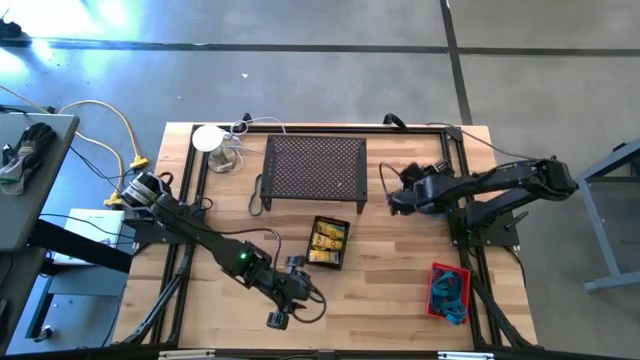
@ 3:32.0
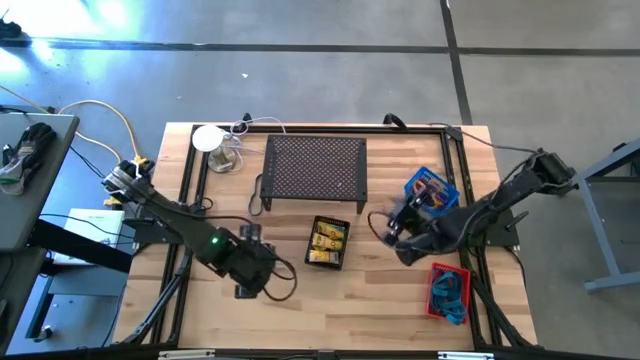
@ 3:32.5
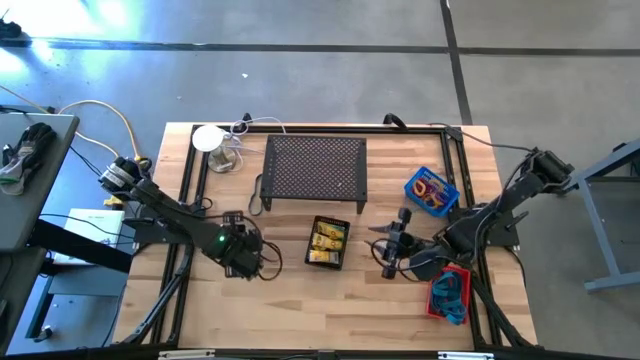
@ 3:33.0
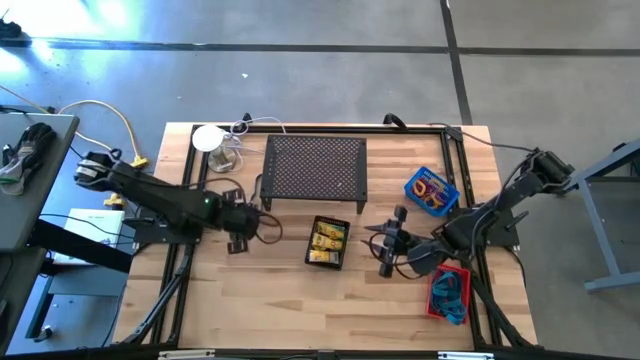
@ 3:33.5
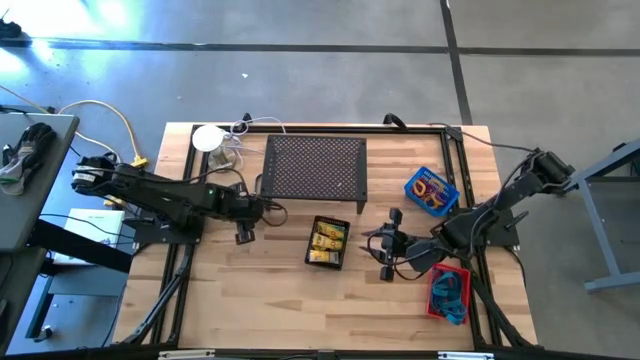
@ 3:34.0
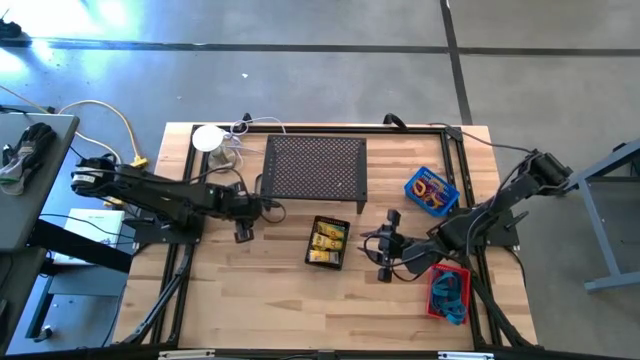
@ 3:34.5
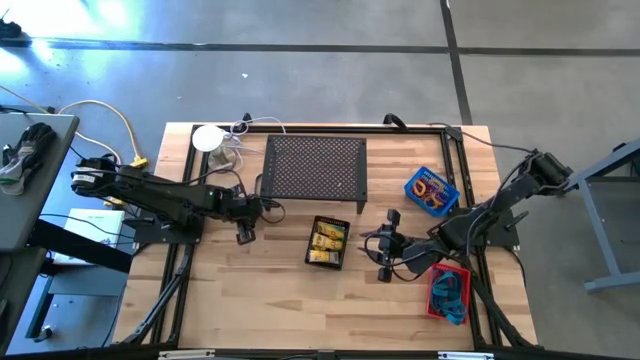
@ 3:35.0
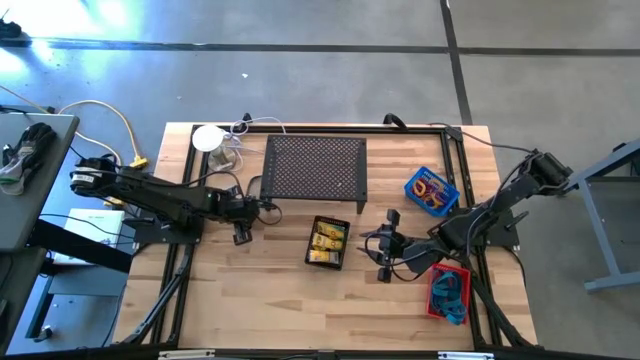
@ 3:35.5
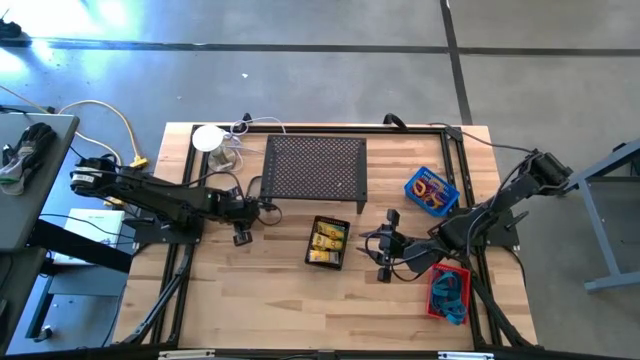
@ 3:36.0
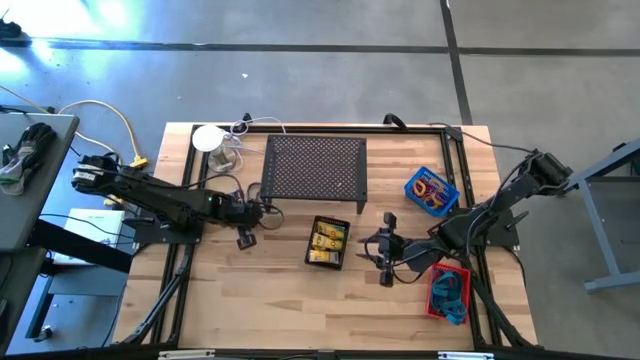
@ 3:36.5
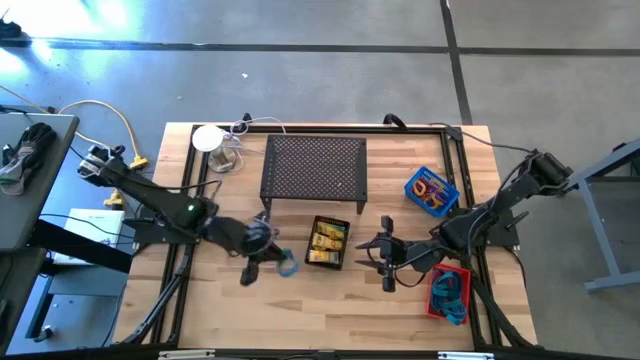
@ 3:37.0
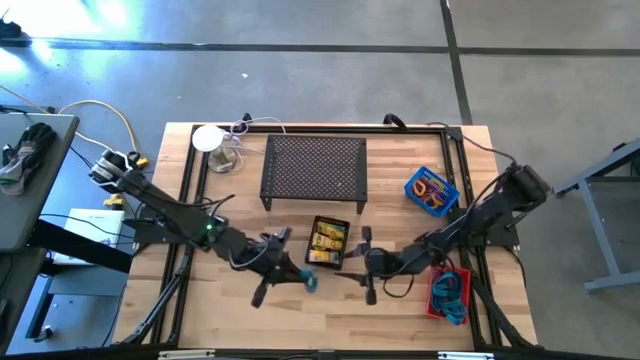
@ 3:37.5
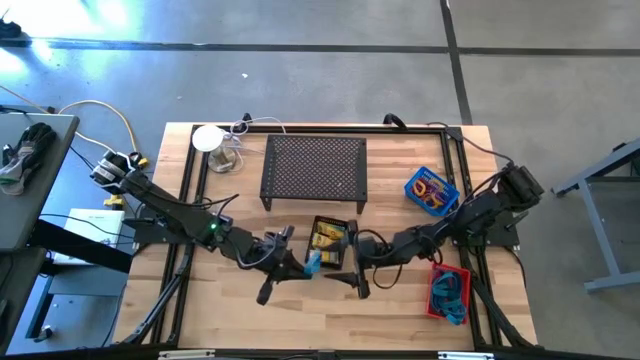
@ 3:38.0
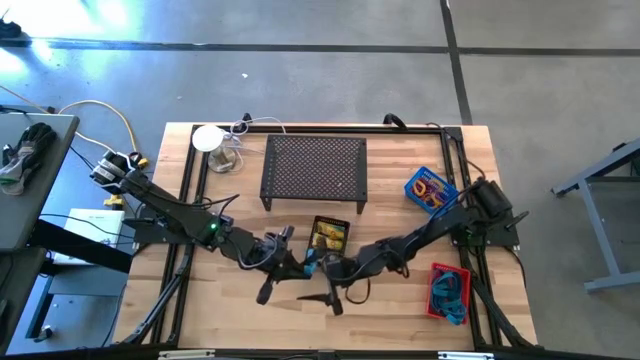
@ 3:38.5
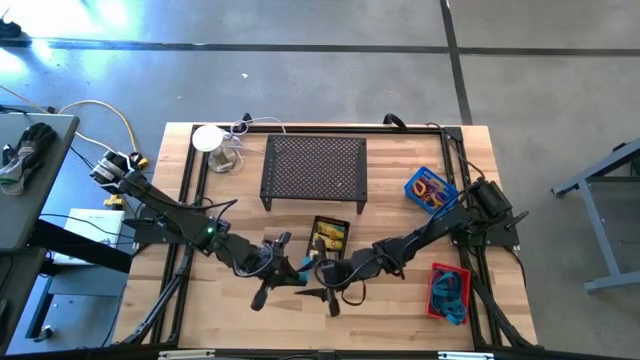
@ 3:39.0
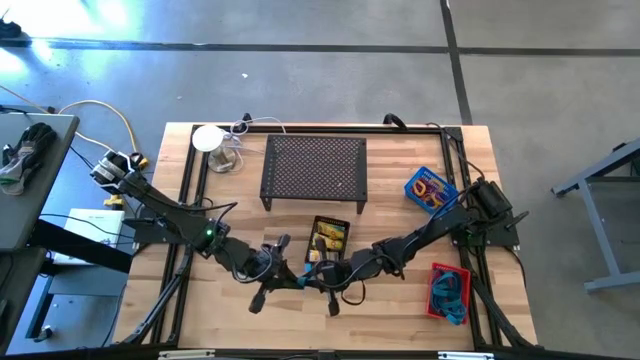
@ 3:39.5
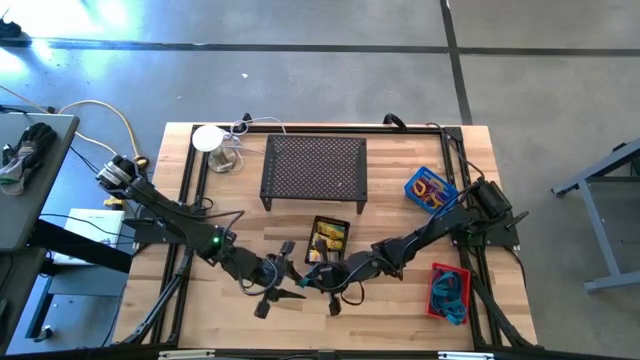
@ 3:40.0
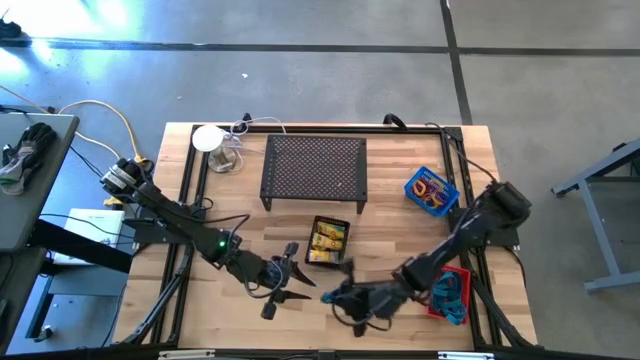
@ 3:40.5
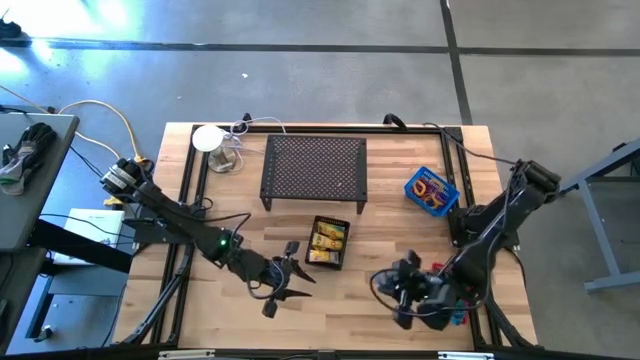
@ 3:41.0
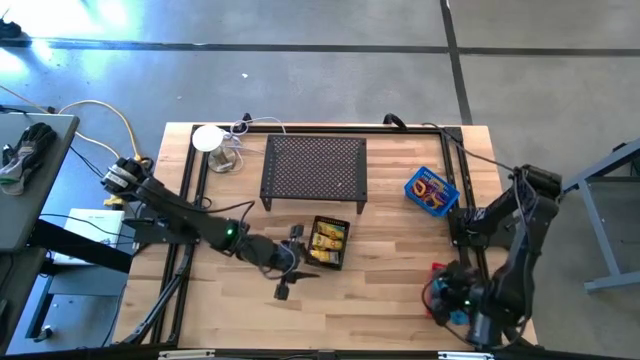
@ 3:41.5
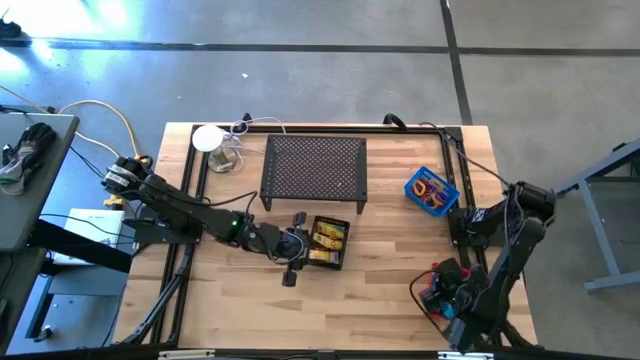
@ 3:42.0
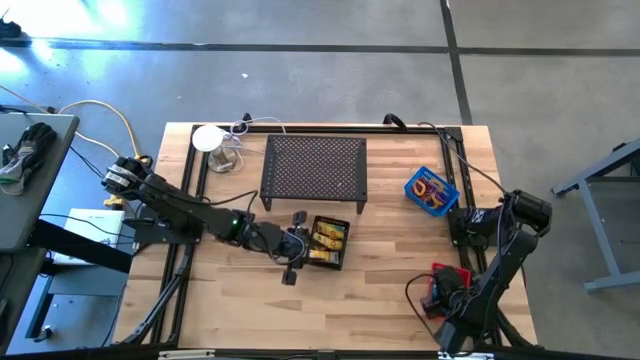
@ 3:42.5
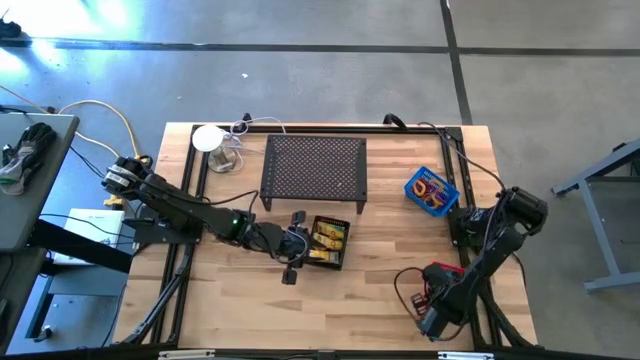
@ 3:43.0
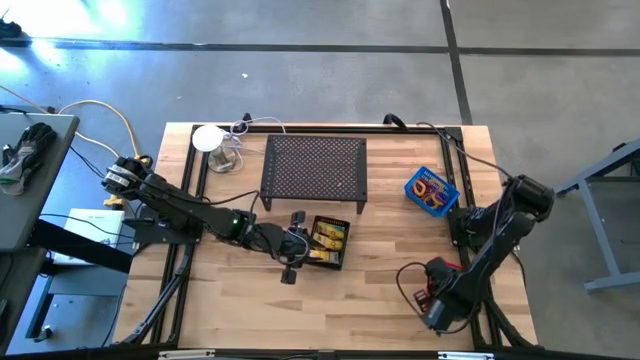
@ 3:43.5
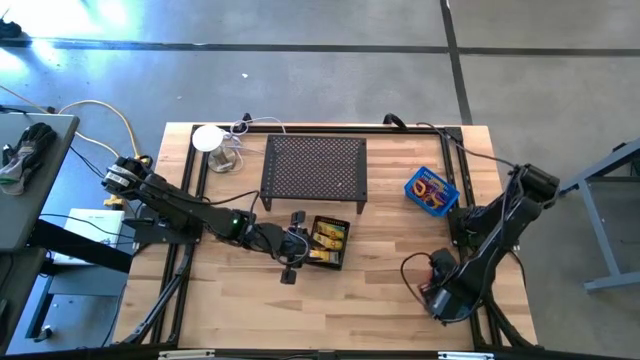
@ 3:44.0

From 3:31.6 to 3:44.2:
Task: Pick & Place Office Desk Supplies
Put the blue rubber band into the orange bin

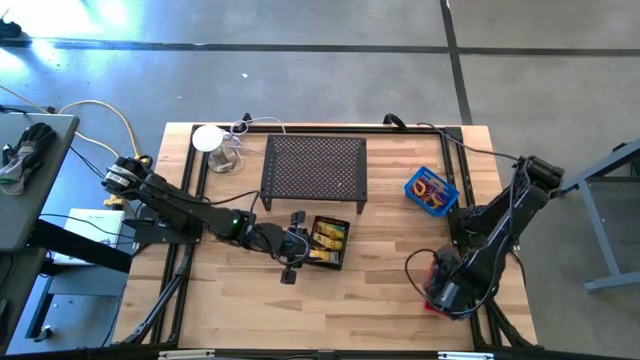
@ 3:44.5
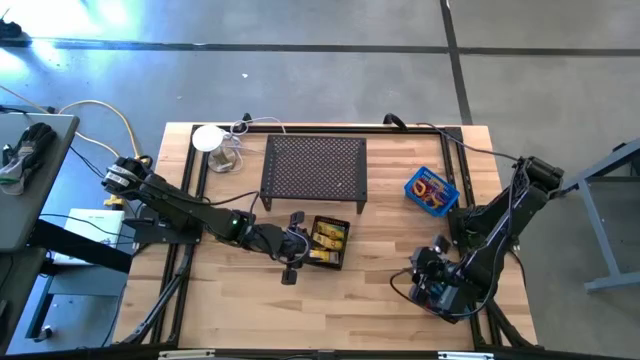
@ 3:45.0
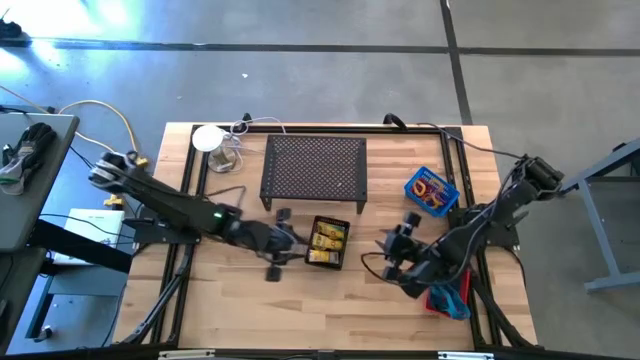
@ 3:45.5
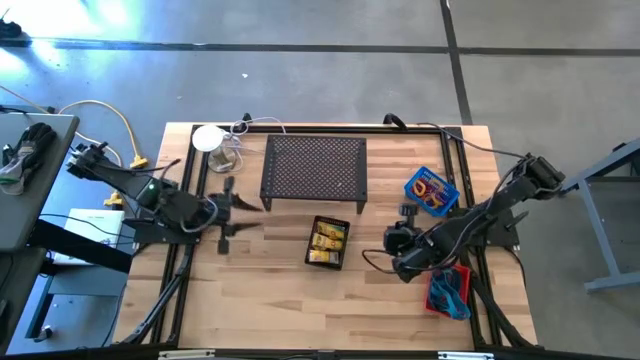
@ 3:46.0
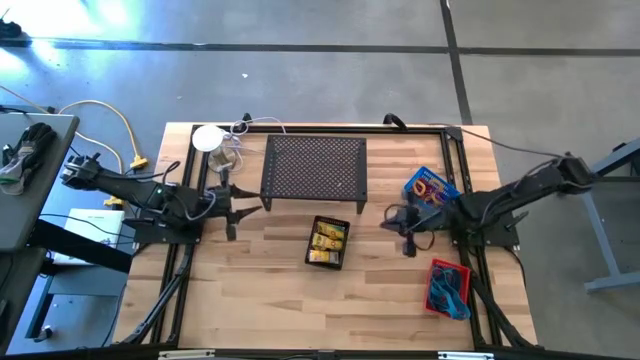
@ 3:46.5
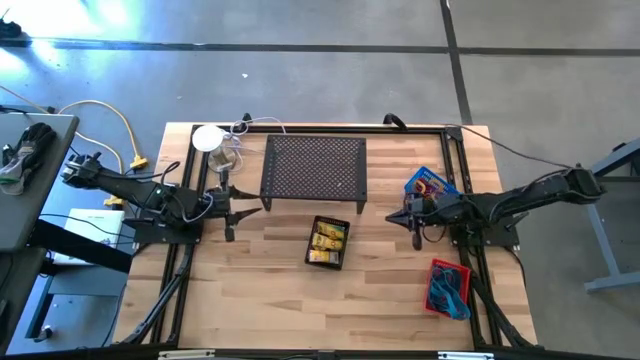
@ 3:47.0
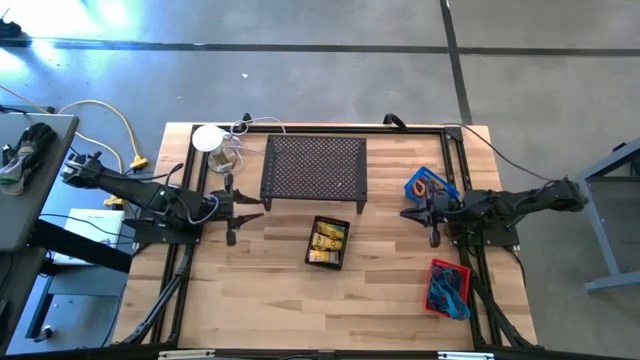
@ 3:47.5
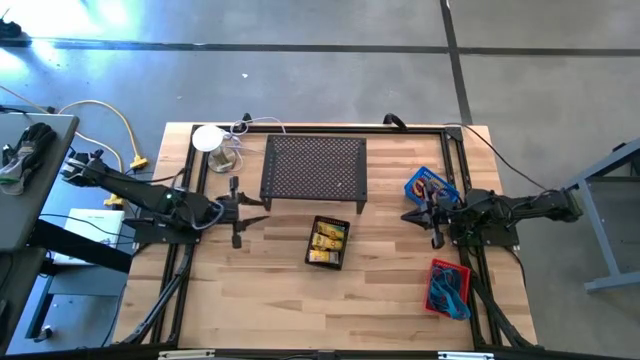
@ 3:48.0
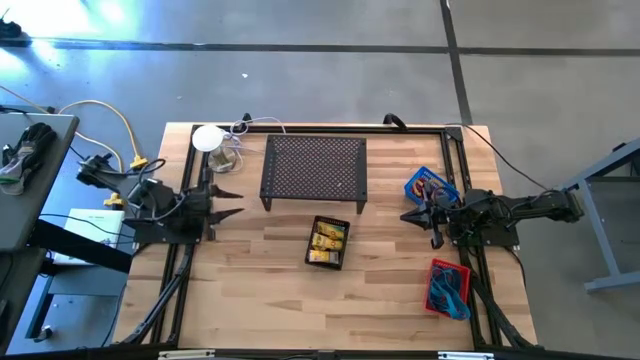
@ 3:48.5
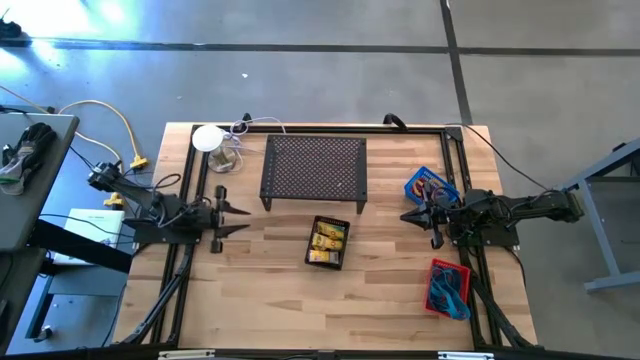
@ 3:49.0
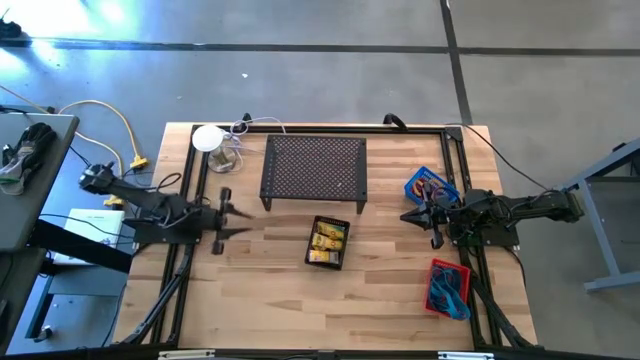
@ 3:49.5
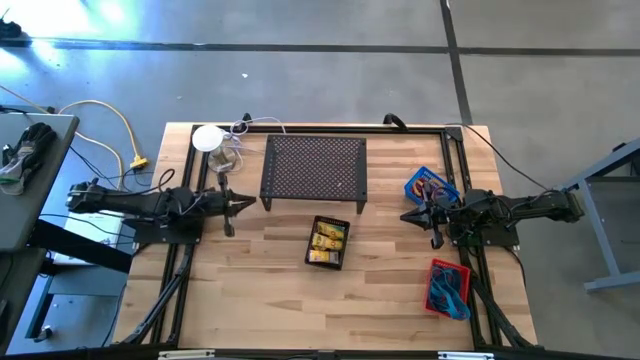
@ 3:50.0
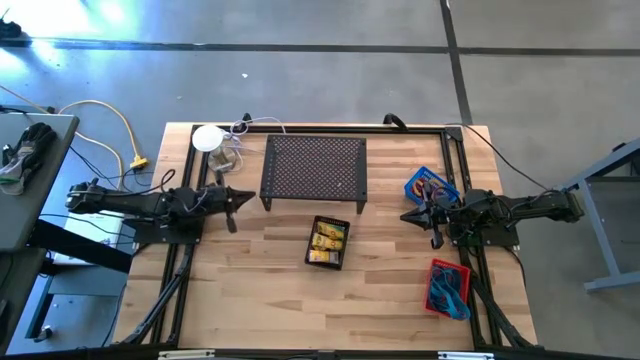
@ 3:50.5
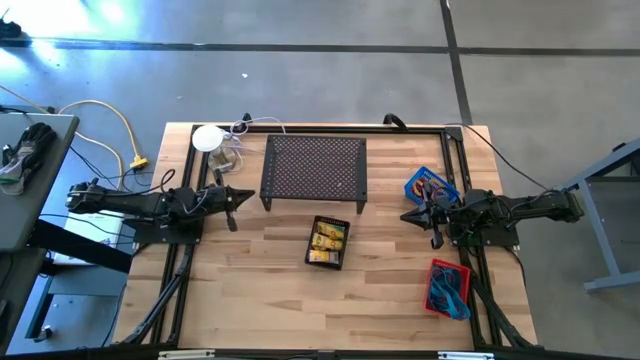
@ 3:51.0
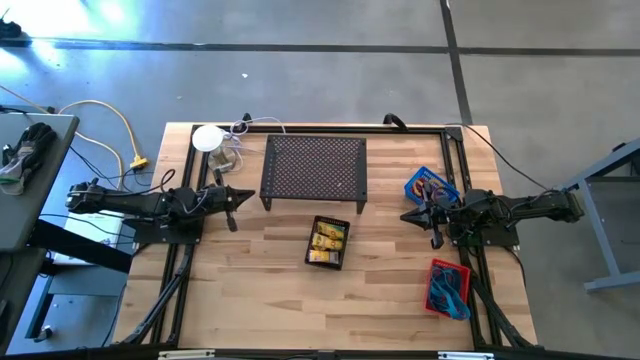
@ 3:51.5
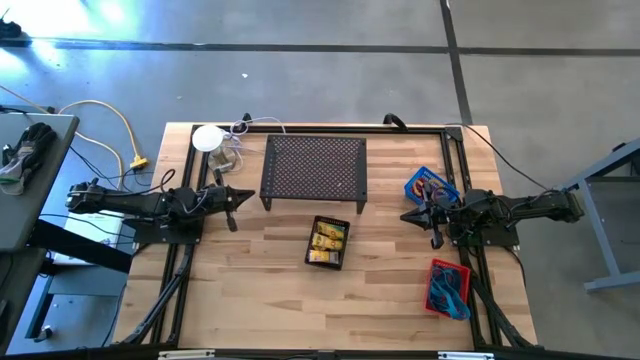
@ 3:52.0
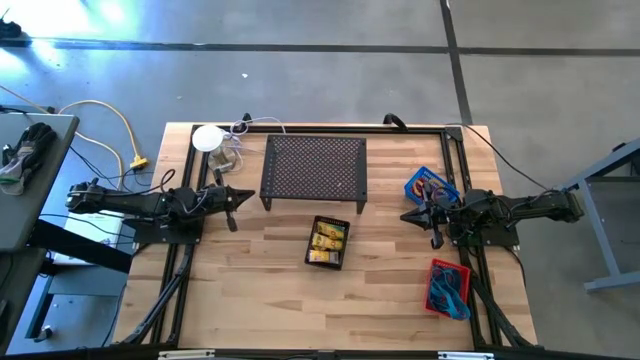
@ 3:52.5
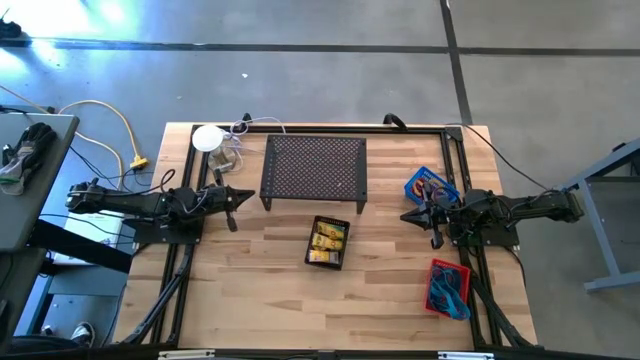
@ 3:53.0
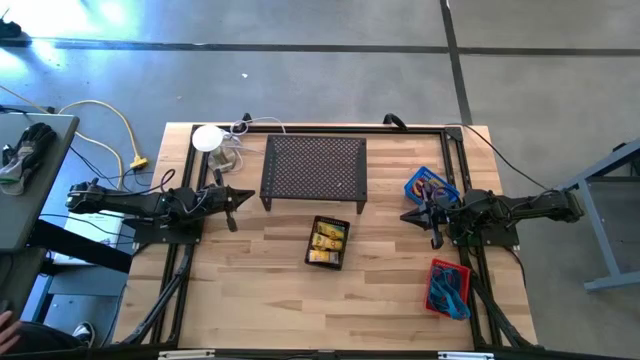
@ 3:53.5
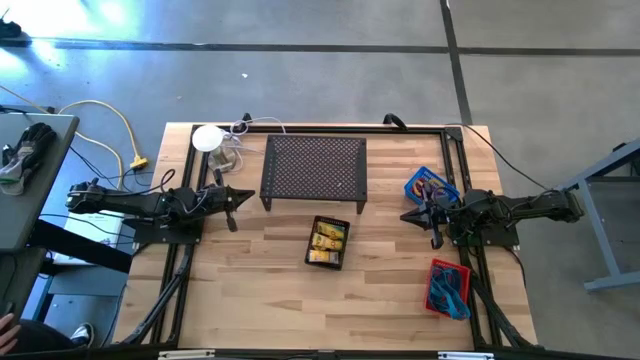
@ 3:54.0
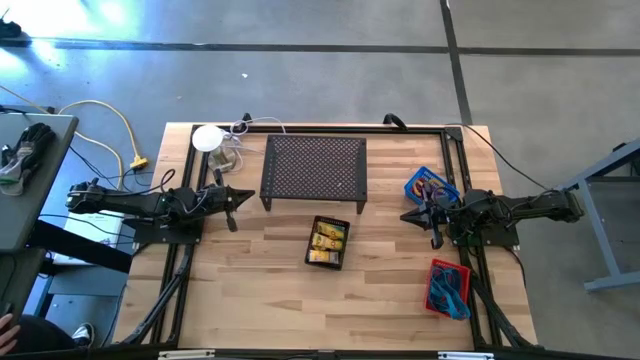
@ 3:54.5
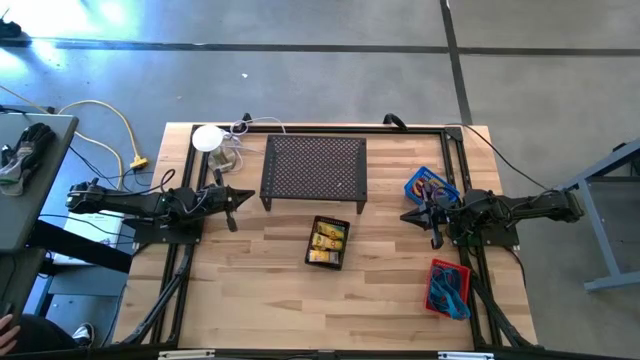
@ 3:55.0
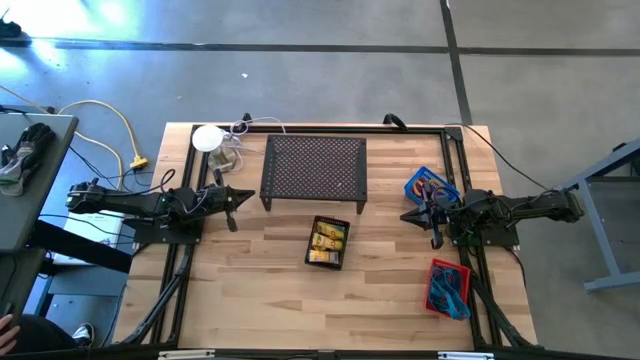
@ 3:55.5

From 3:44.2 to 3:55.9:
Return to Home Position
